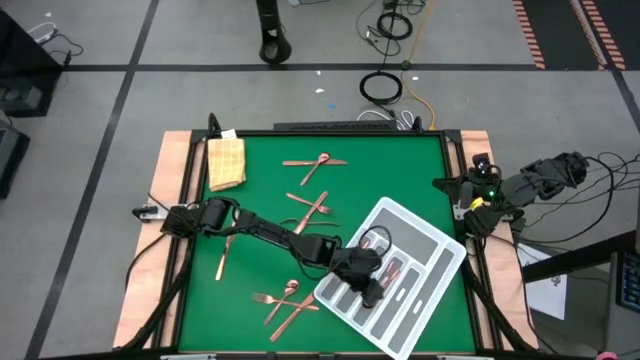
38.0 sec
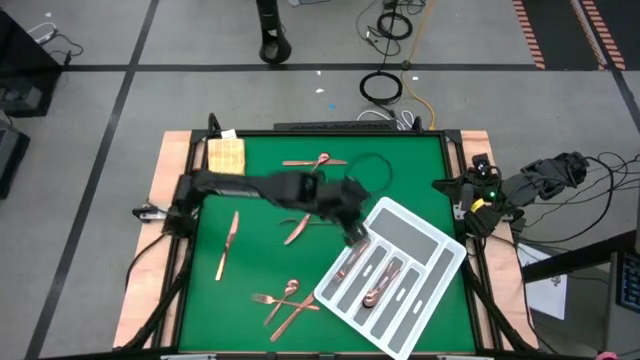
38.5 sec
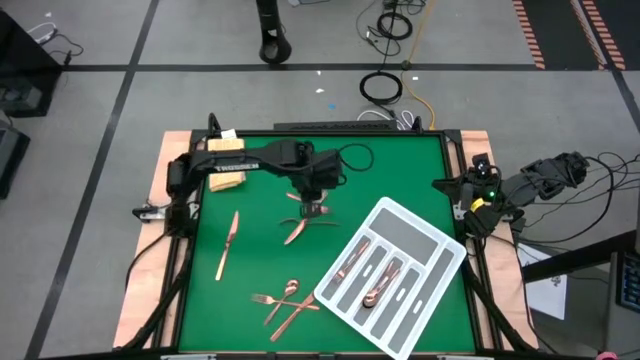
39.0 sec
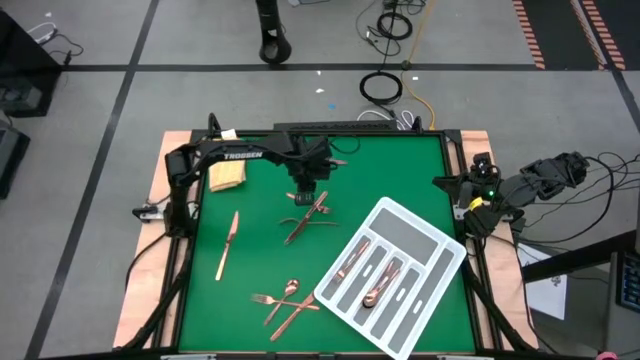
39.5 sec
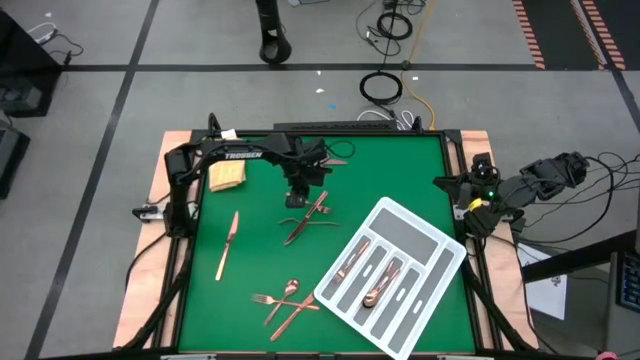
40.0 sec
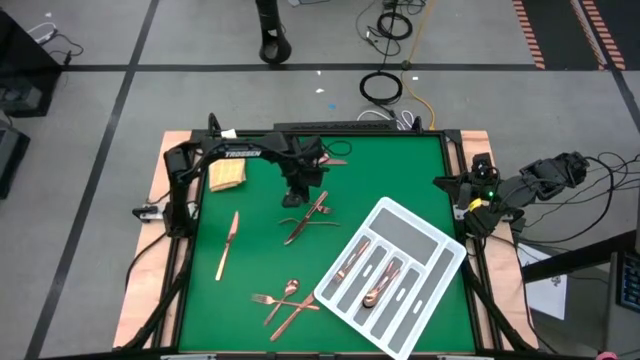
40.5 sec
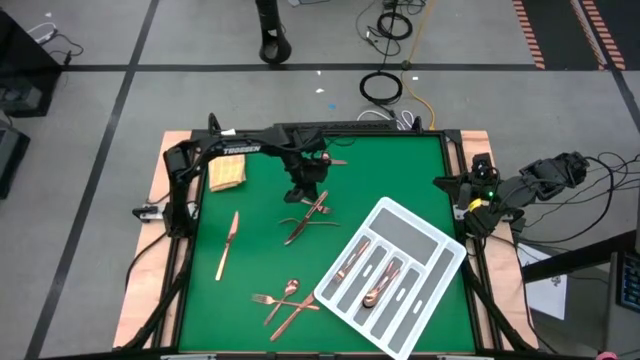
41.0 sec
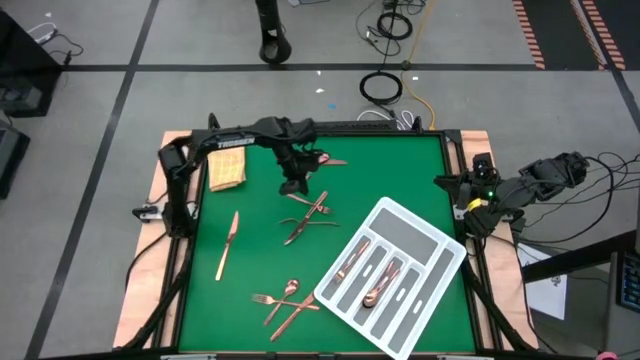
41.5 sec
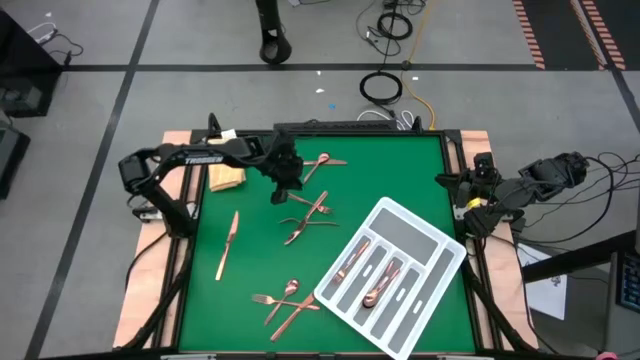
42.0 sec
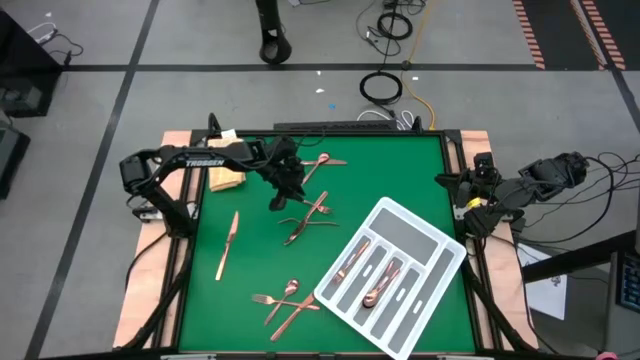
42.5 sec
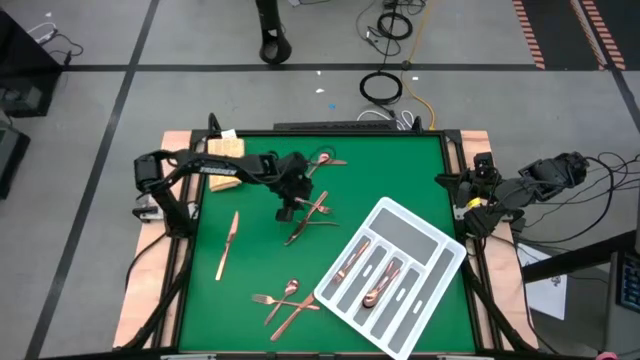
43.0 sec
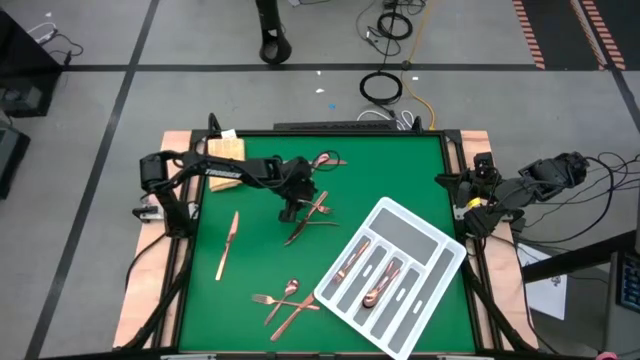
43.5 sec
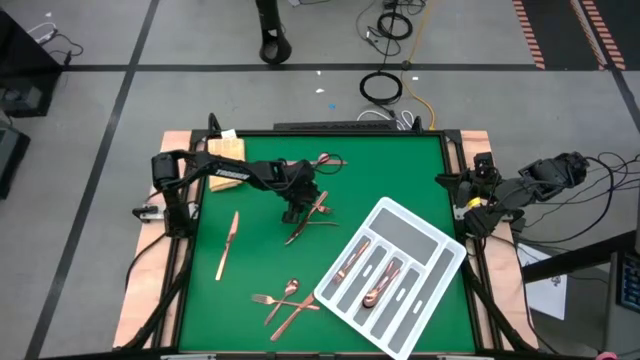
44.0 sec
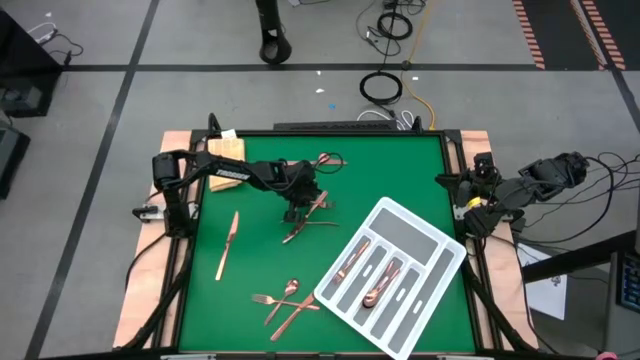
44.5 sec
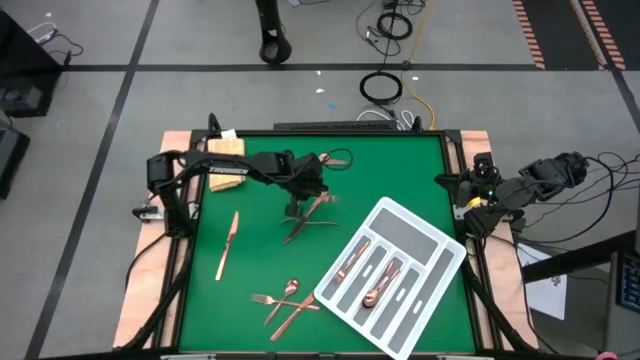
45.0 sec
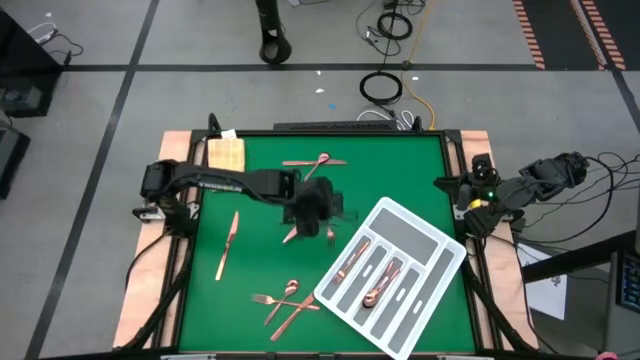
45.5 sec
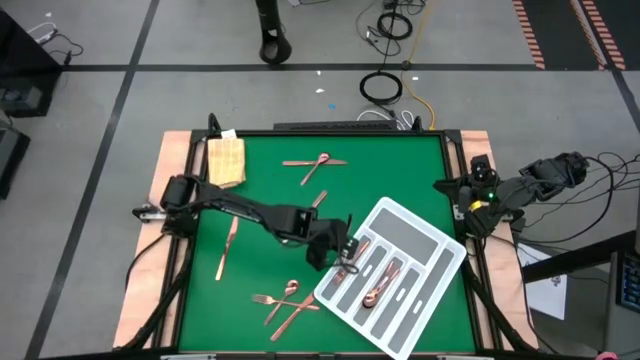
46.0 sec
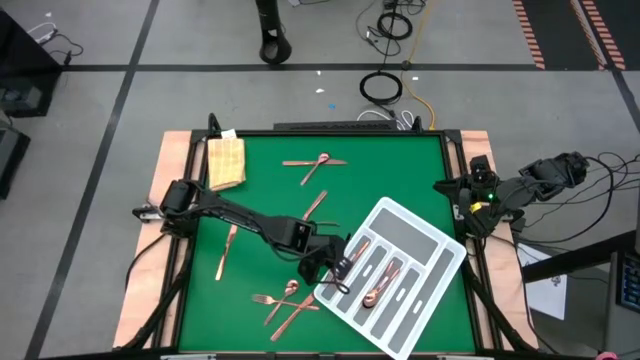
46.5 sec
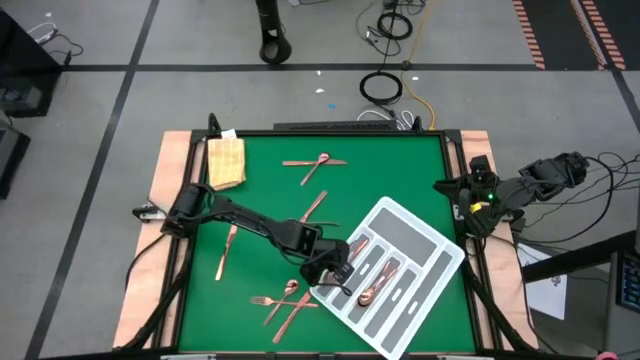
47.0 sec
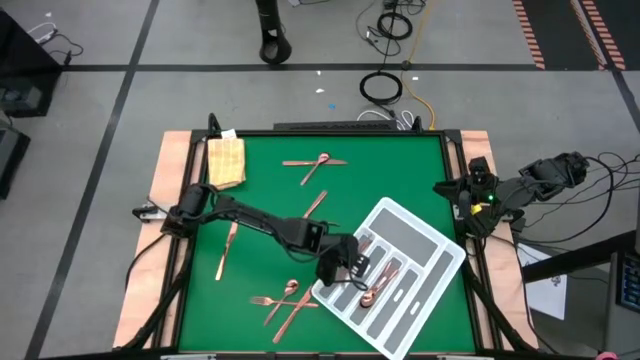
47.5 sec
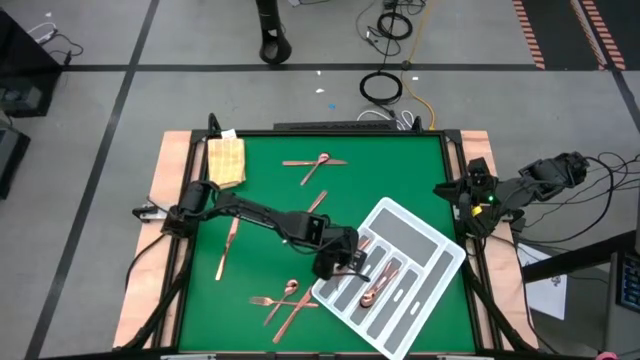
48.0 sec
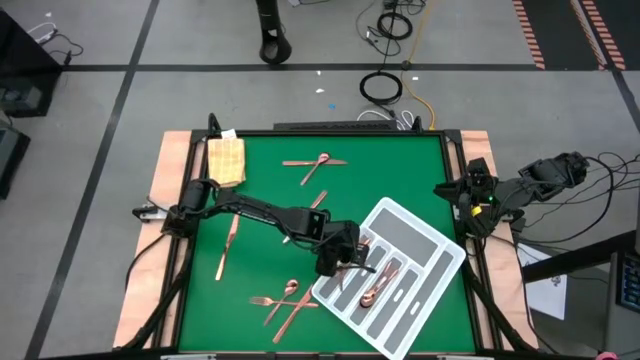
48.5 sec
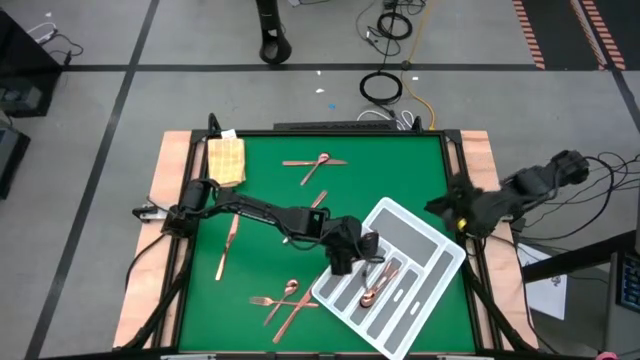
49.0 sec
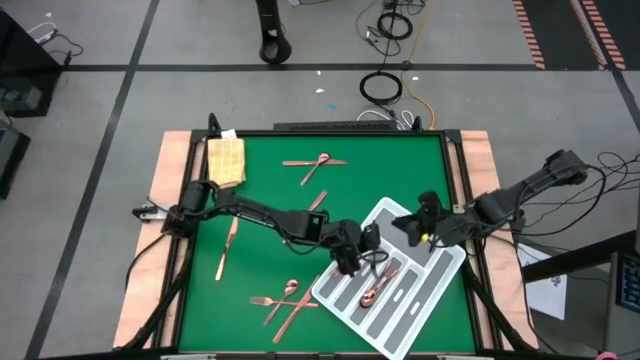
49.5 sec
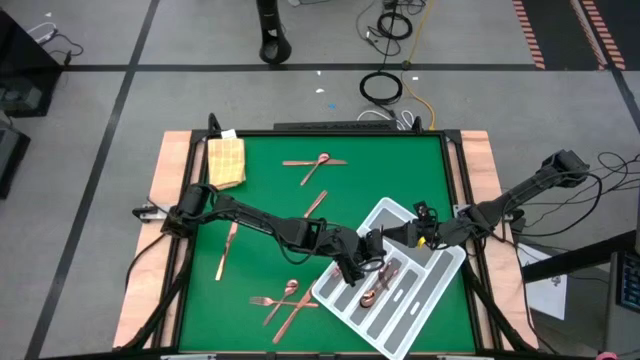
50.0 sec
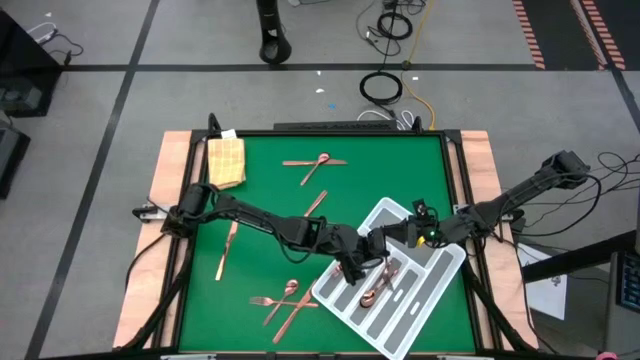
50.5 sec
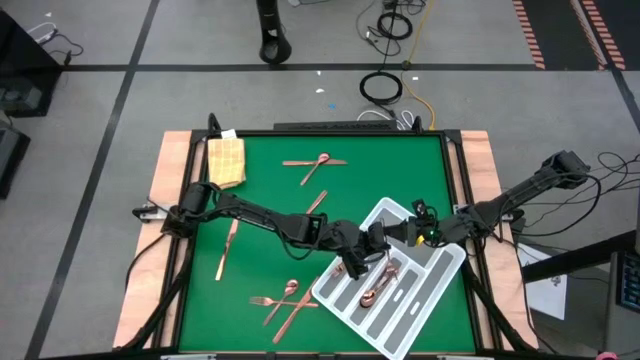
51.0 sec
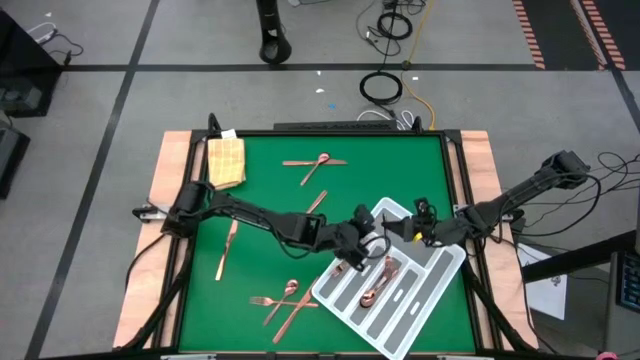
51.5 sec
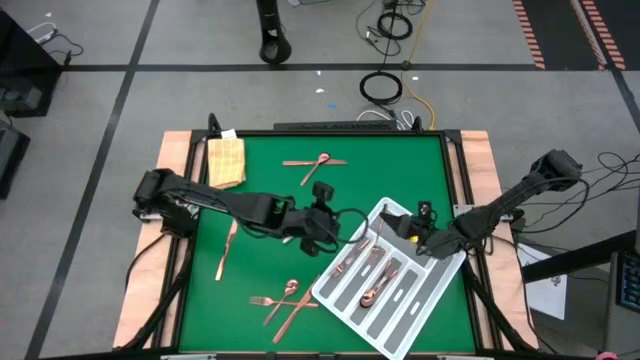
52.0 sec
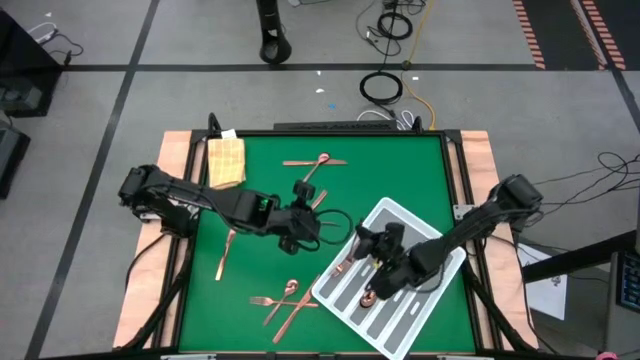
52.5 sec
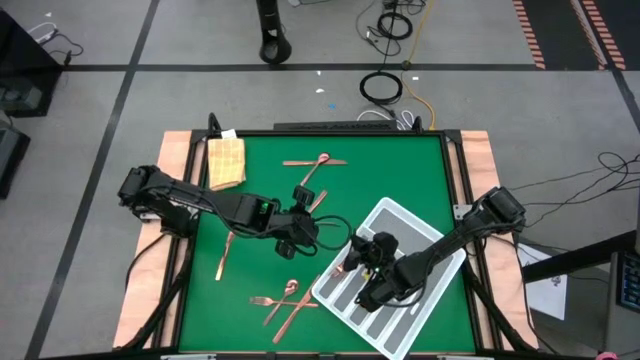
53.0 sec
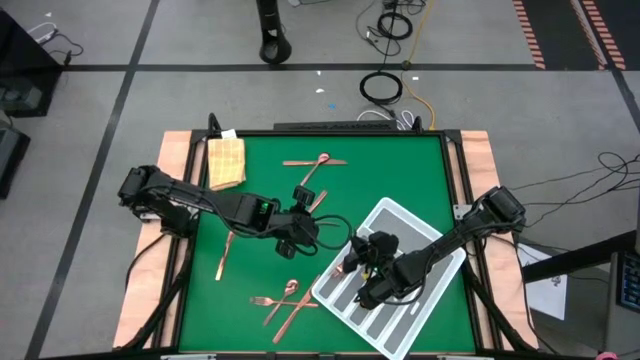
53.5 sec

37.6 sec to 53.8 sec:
Task: Sort silverware
Put the bronze fork into the silverware tray

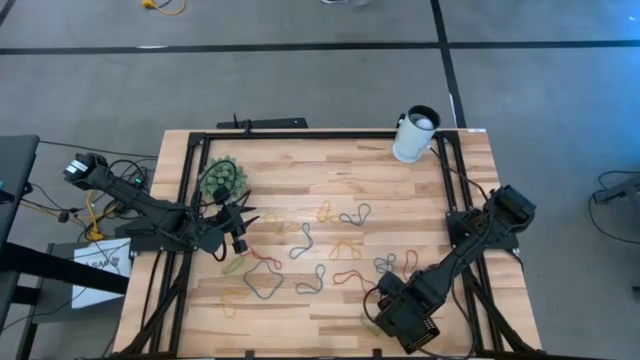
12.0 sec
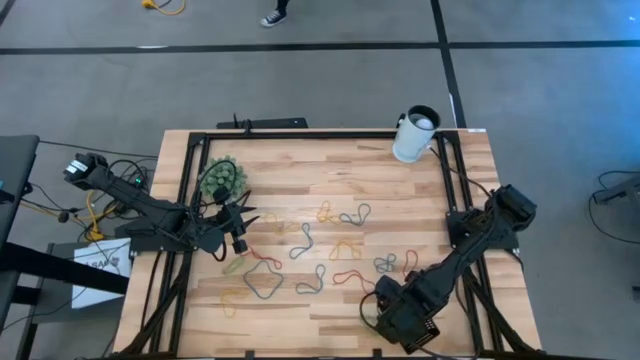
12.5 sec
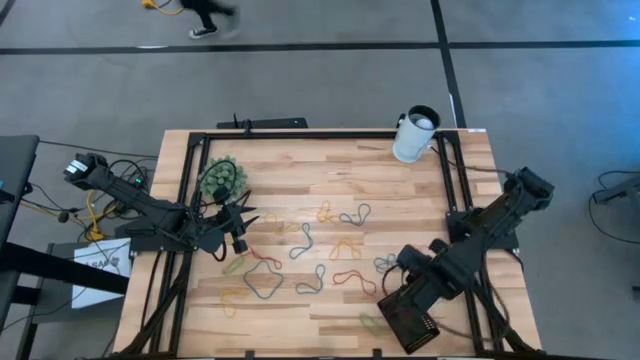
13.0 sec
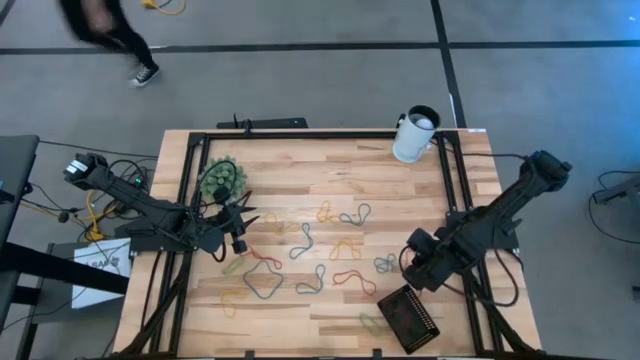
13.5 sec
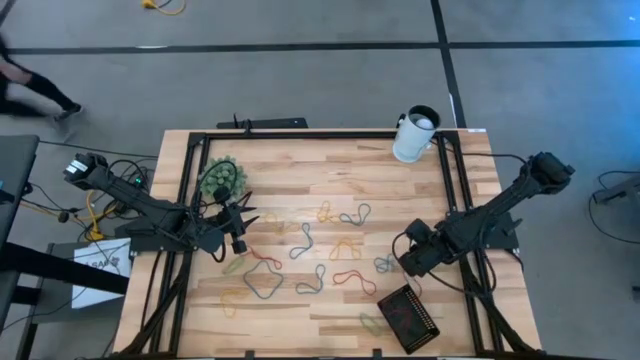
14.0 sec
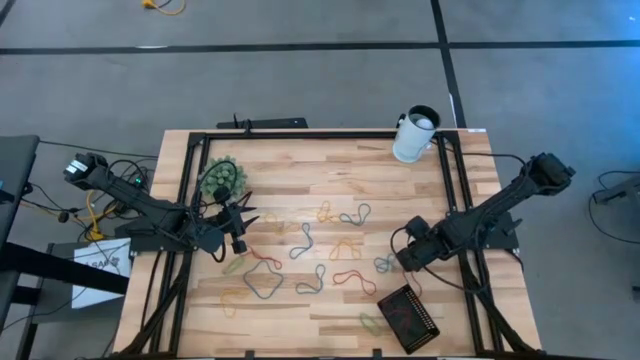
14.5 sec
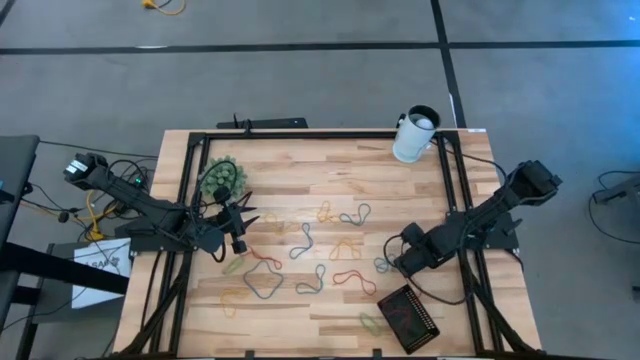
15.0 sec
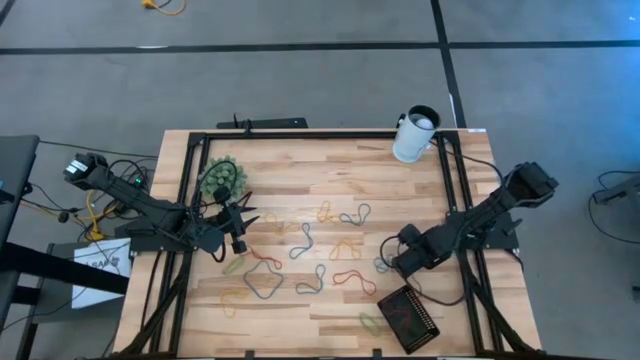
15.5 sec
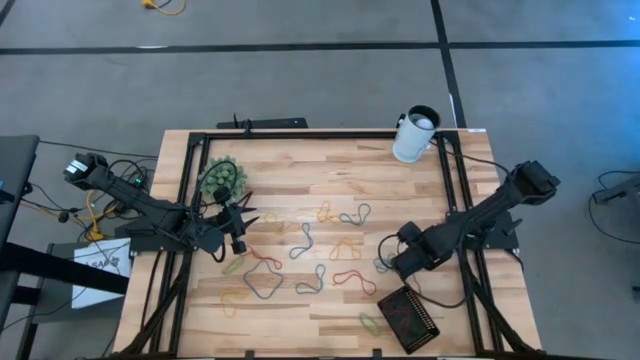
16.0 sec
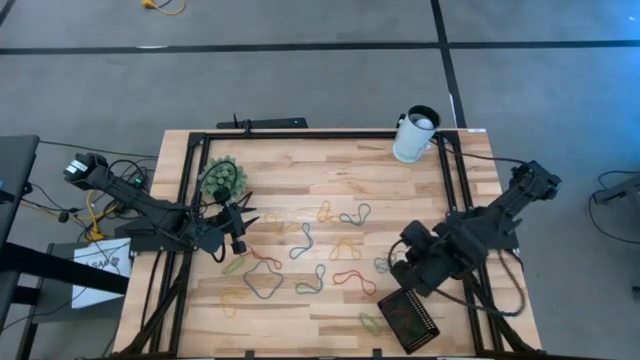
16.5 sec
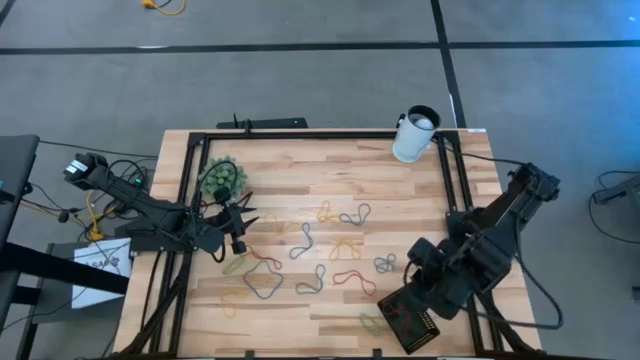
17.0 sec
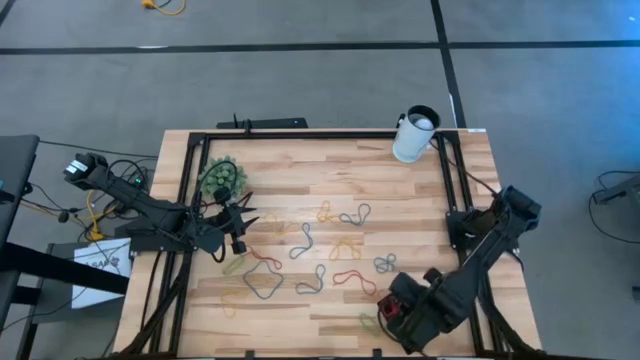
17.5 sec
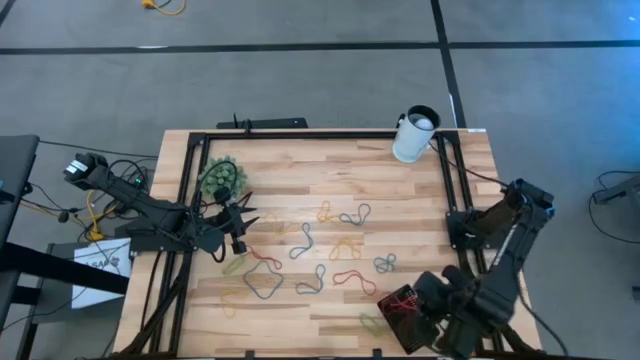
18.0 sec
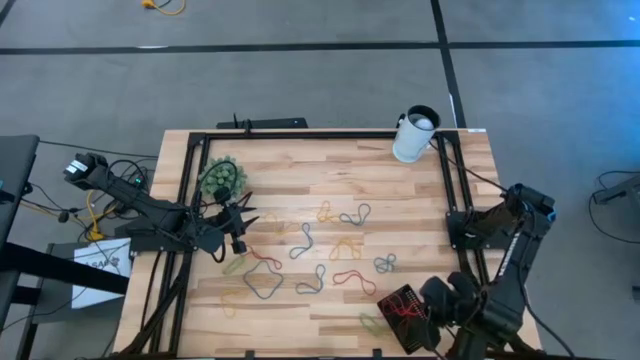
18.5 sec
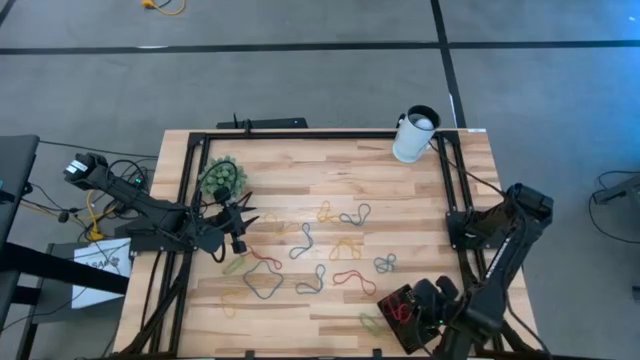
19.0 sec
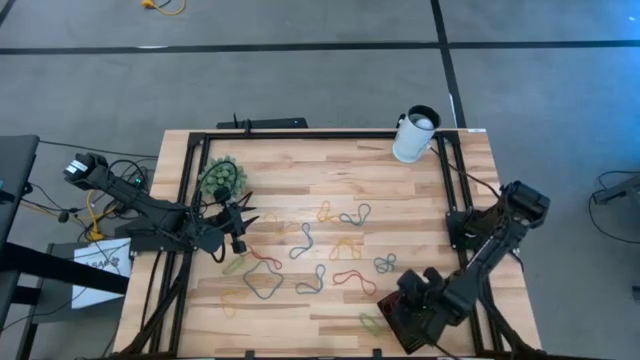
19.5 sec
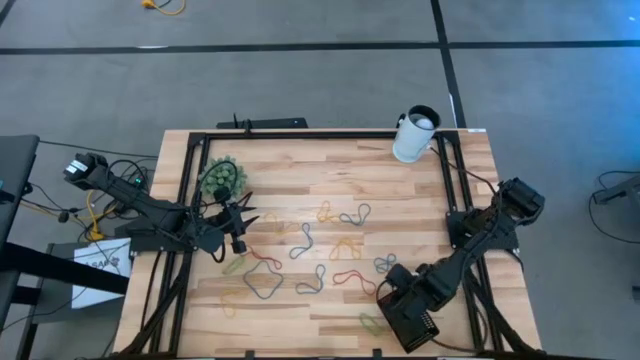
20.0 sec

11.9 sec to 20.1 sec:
Task: Pick and place rubber bands into bin
Put the red rubber band into the black basket
